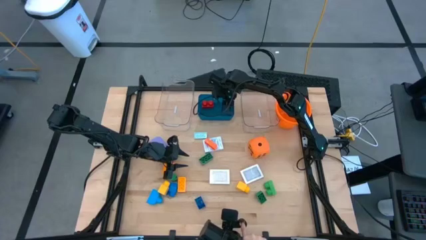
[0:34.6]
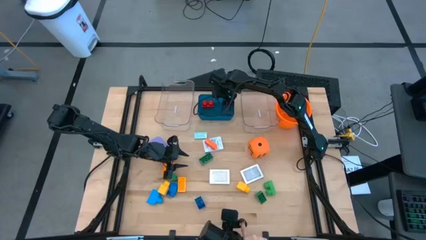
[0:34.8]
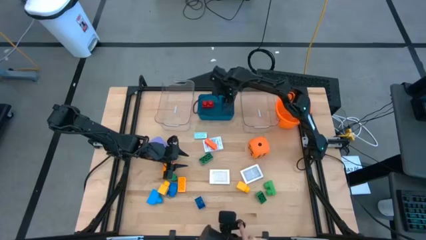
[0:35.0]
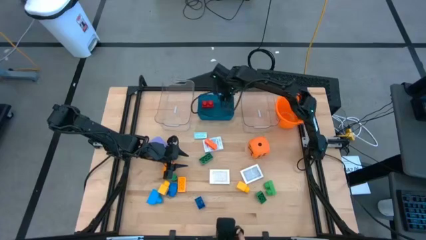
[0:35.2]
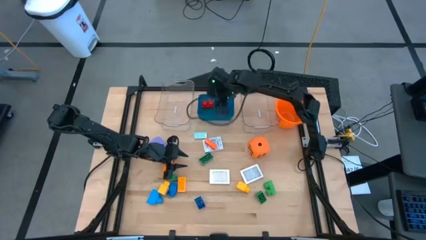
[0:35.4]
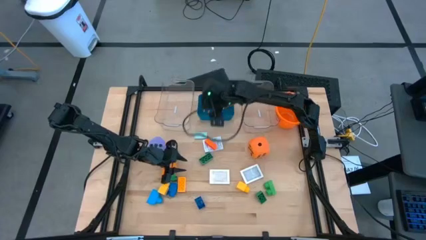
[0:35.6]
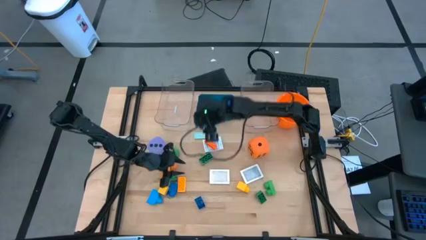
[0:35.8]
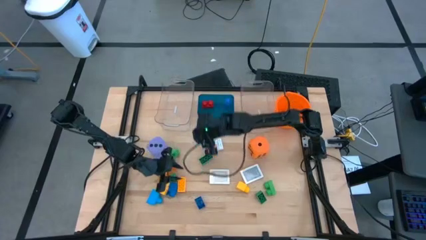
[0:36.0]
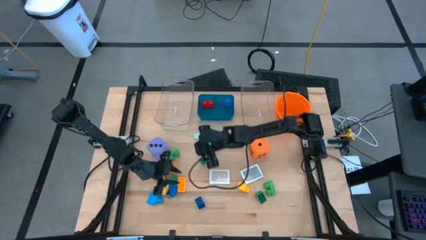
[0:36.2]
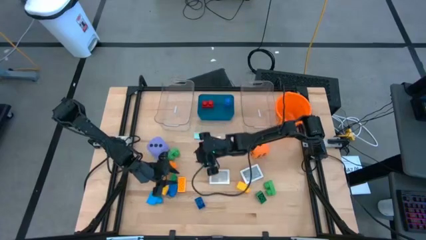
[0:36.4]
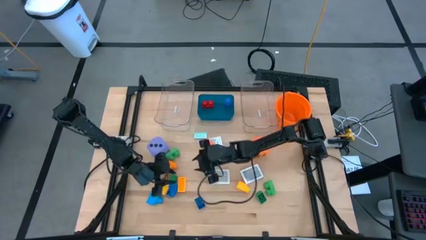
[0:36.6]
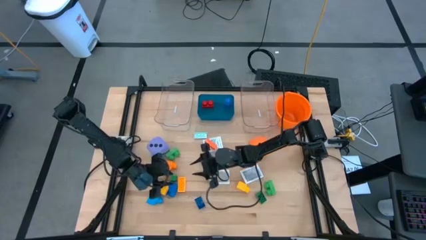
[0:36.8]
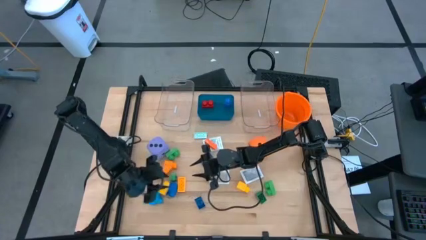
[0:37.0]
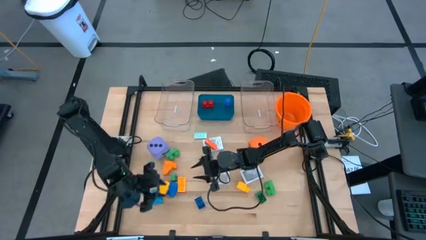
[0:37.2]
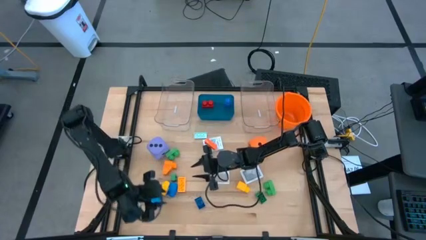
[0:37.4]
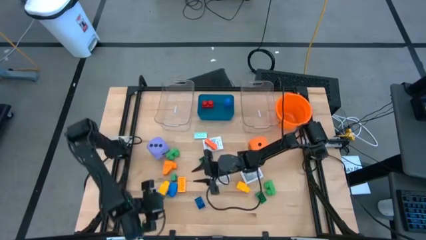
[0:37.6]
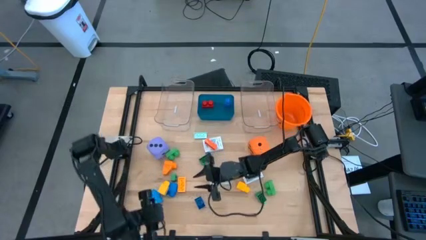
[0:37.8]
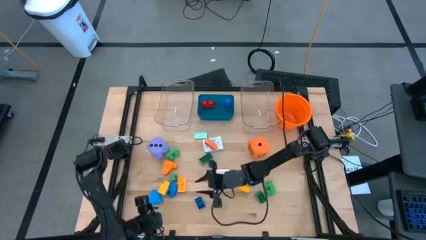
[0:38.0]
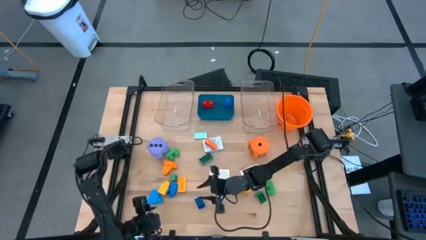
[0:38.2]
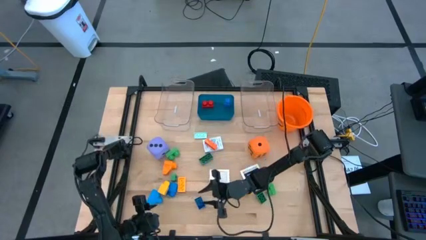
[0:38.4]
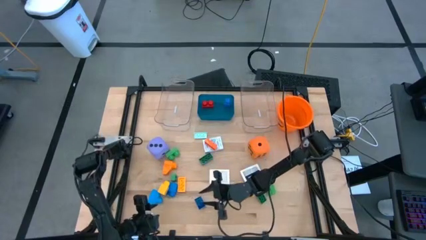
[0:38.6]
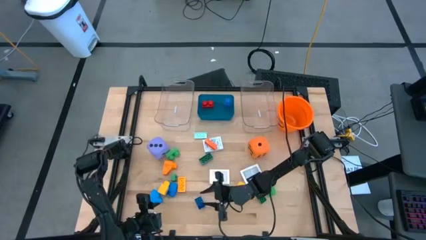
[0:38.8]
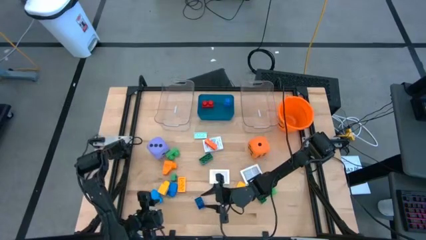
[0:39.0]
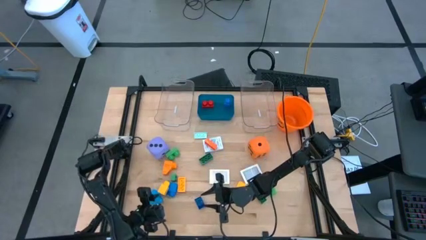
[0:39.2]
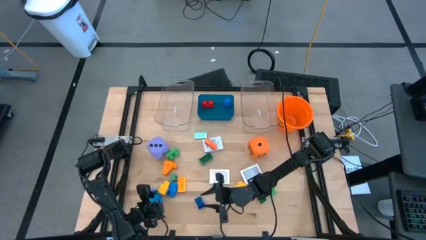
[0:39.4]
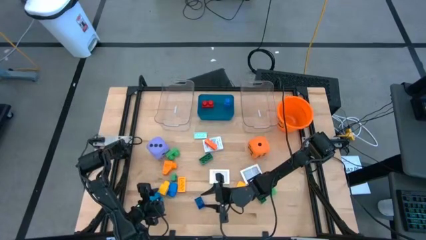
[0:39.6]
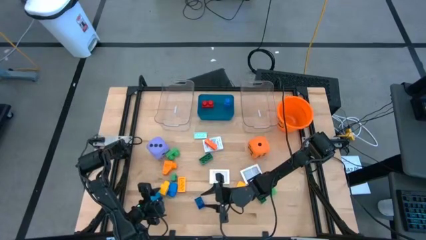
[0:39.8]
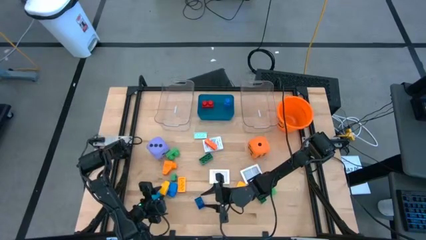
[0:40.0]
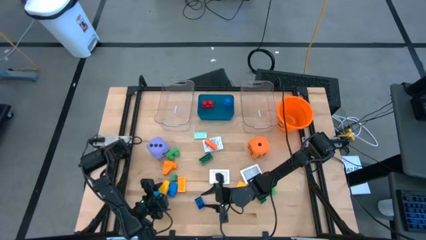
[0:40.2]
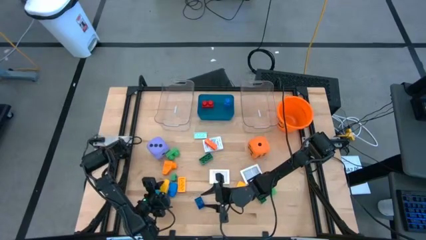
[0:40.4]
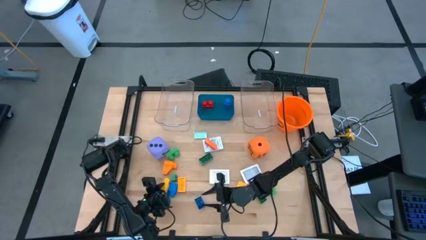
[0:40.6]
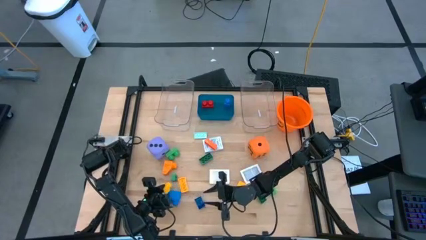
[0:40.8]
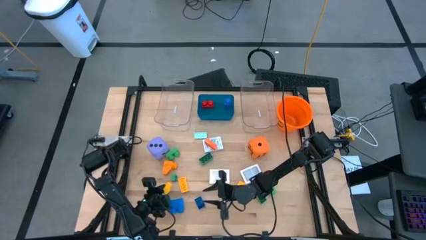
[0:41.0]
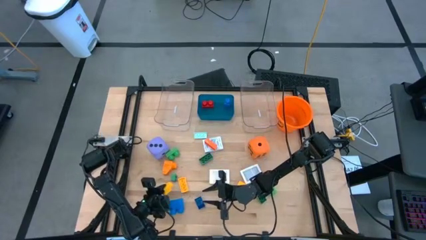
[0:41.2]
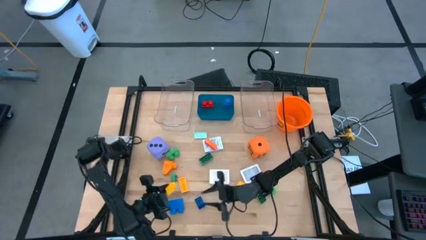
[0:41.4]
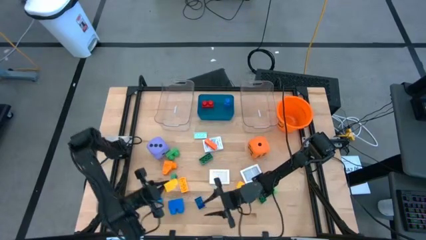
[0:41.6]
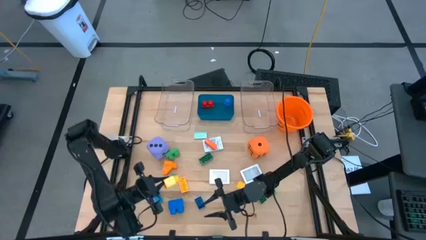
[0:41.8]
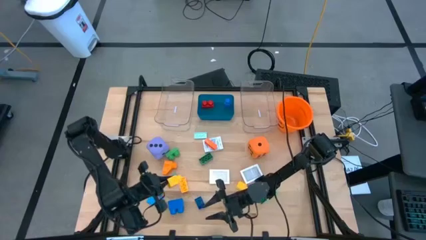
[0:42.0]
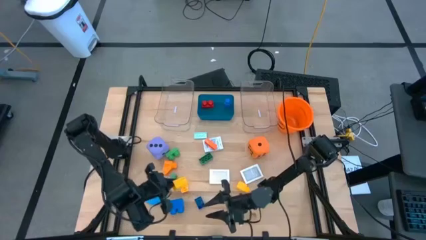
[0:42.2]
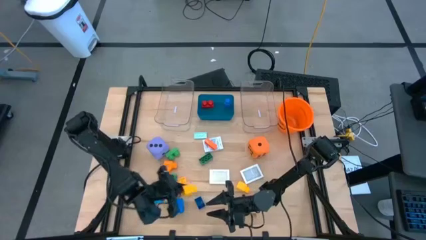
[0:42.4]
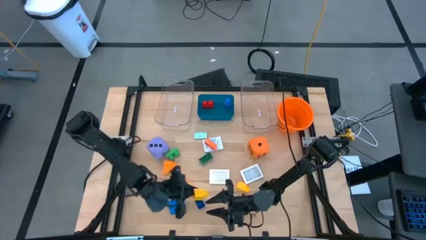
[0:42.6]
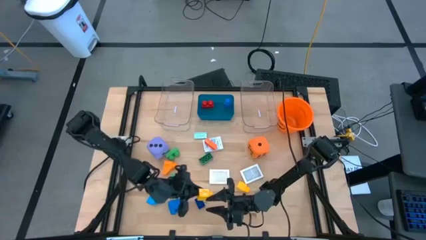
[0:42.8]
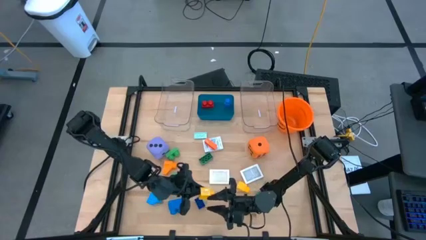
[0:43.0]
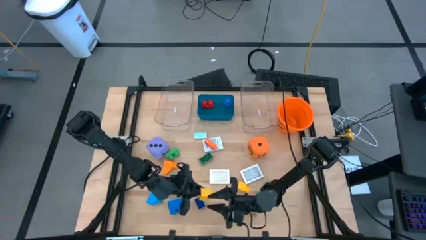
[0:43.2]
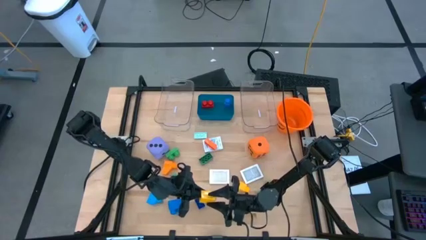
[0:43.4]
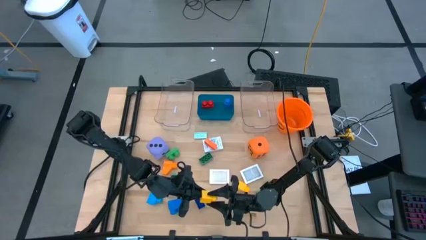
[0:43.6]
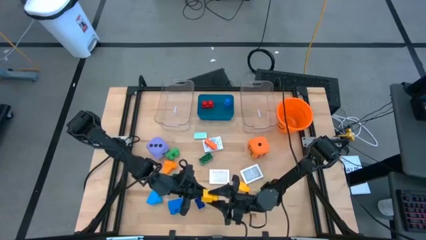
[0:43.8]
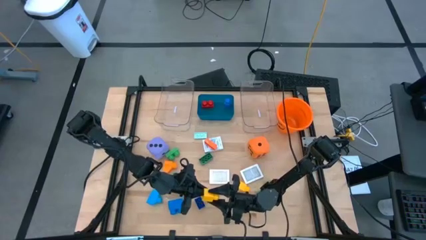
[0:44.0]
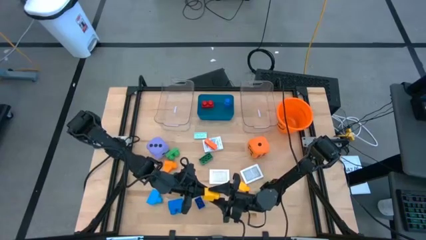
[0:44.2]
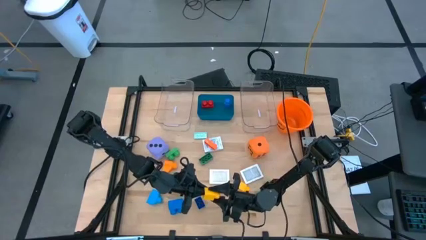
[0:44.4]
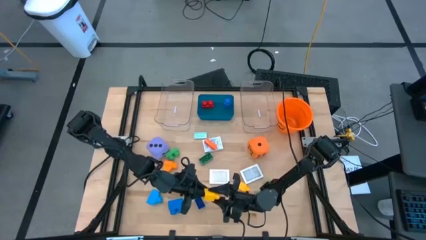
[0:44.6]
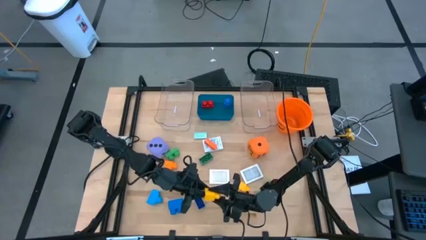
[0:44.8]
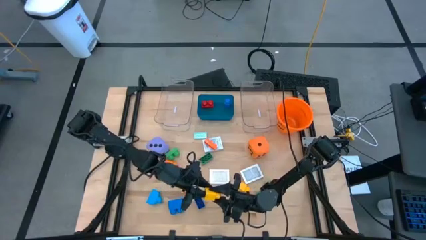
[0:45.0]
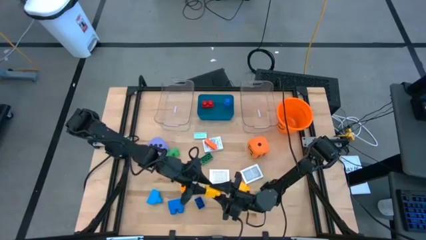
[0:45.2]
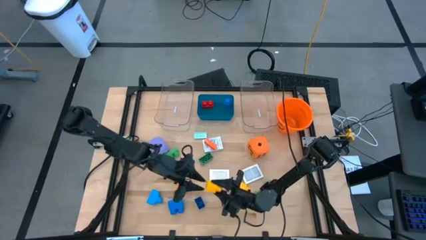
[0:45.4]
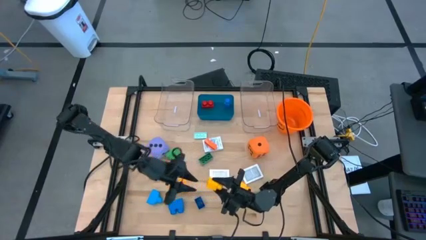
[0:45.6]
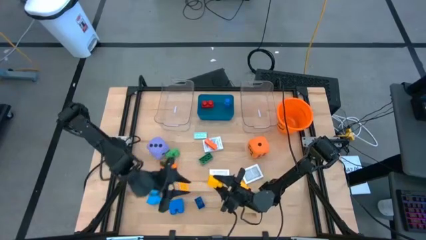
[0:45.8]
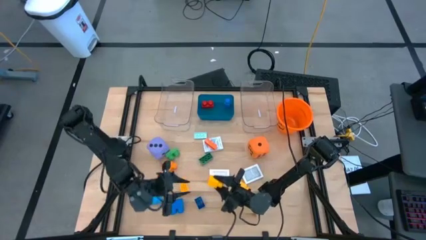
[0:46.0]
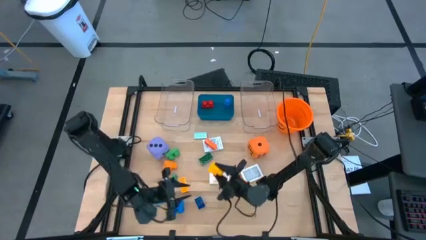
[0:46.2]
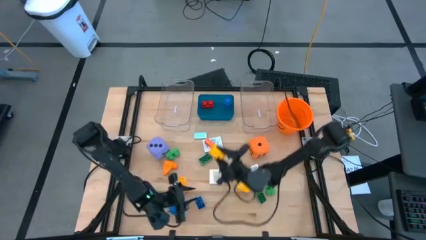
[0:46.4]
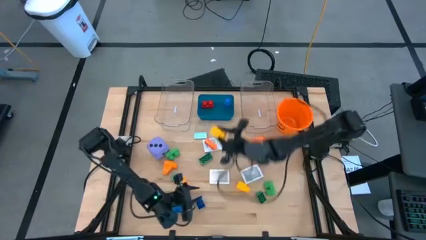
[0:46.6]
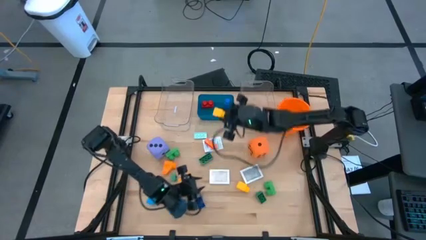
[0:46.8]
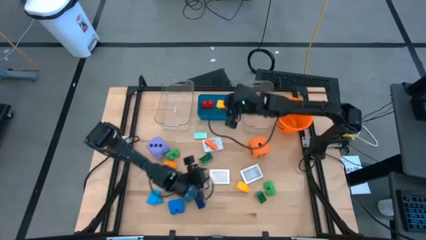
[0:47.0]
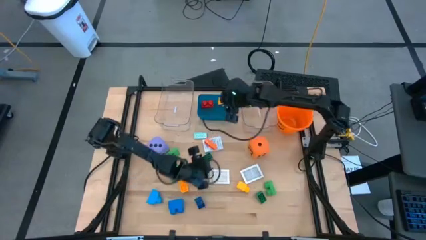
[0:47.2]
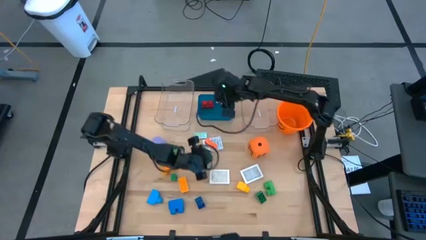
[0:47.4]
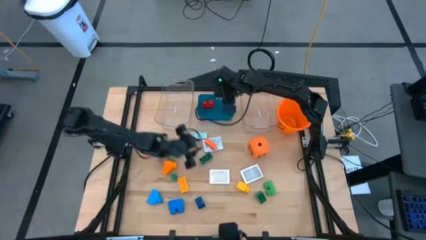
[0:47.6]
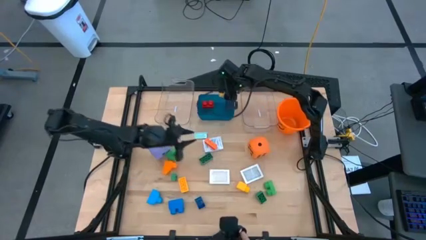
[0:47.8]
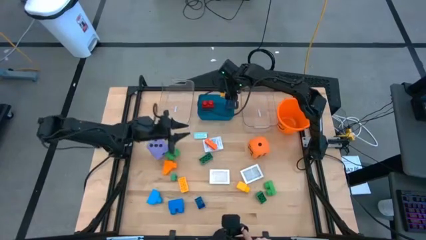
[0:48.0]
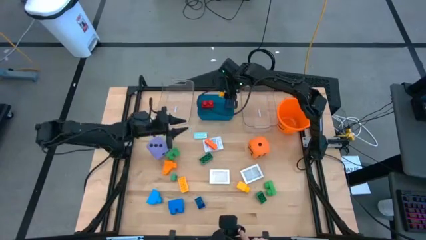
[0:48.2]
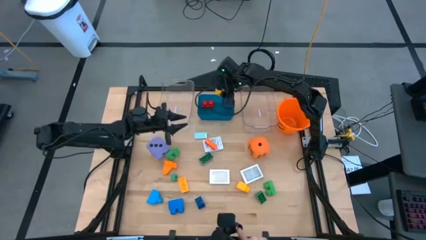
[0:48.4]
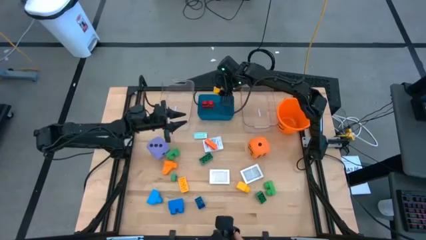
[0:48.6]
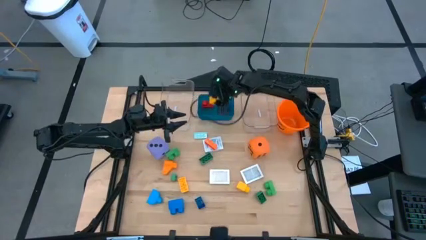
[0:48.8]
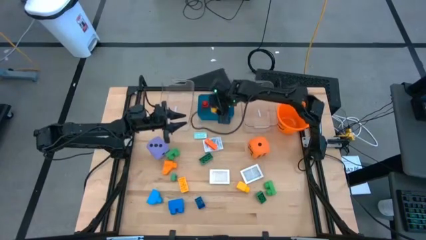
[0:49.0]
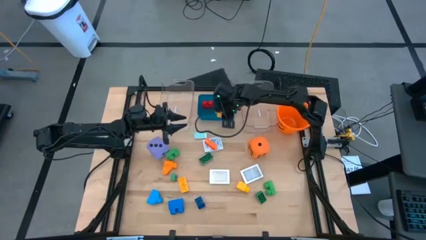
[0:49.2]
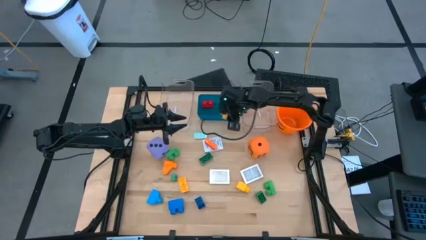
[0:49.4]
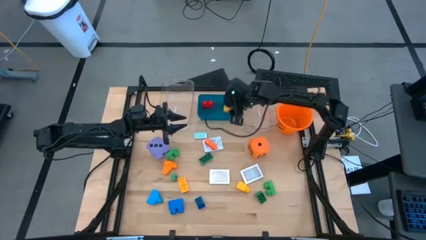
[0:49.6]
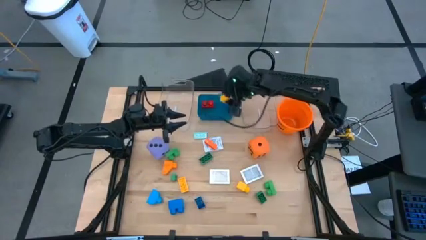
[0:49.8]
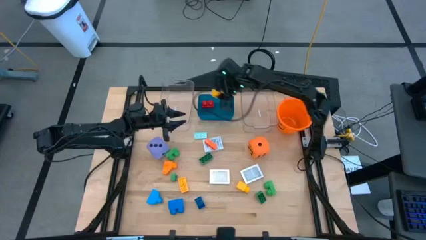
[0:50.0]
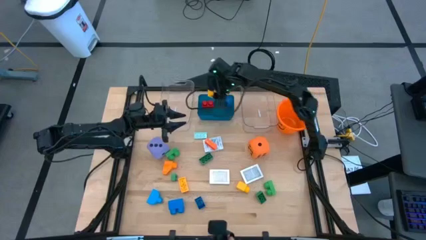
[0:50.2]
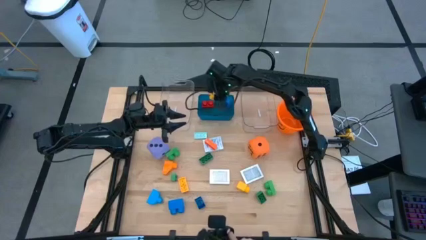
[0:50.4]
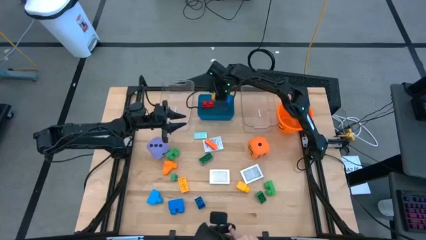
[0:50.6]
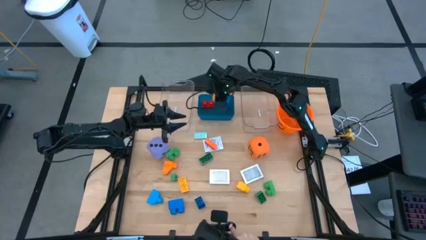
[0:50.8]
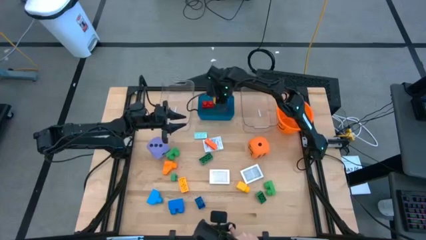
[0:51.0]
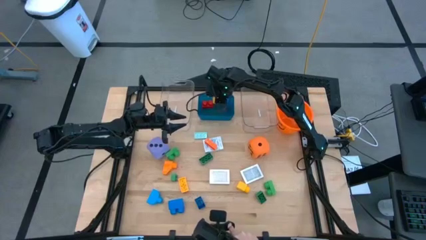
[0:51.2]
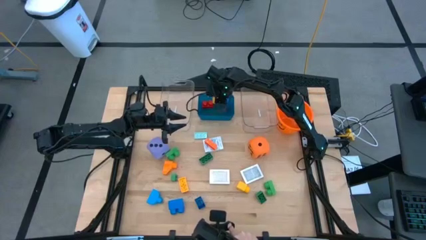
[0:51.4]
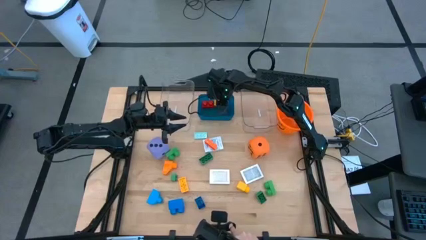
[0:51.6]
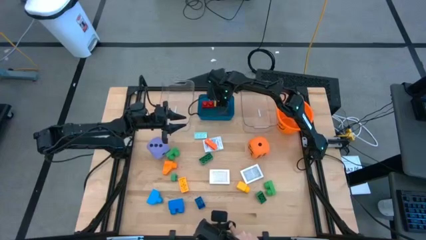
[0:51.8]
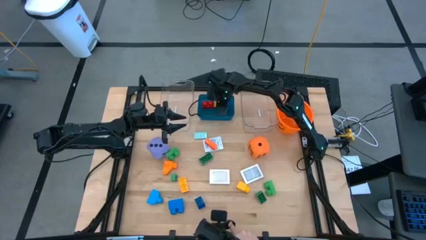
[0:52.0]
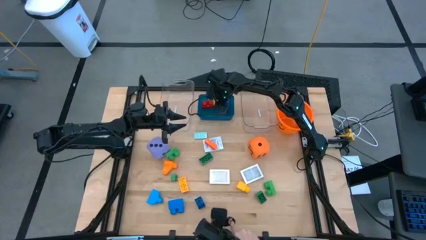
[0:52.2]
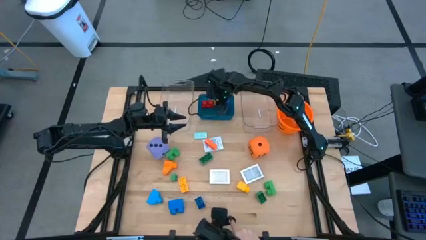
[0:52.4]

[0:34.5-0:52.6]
Task: Pick & Place Toys
Put the yellow game piece into the blue bin
